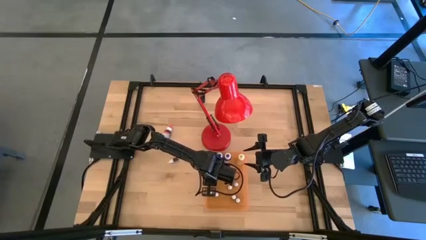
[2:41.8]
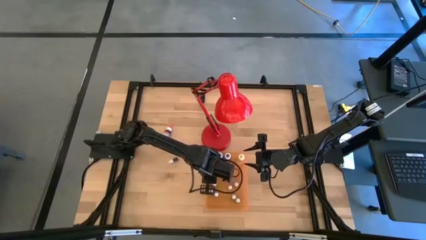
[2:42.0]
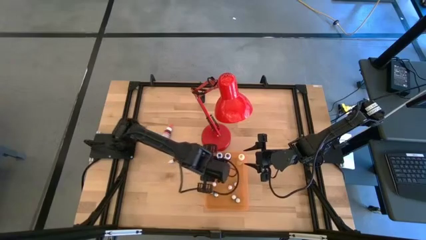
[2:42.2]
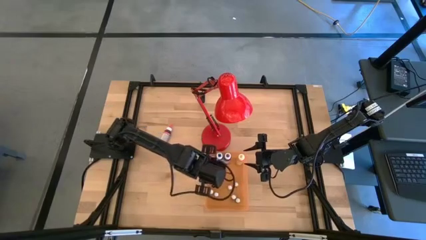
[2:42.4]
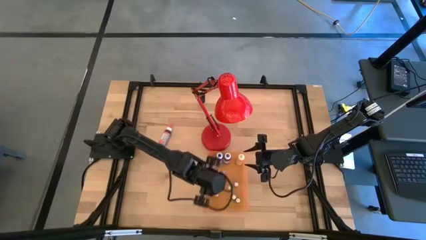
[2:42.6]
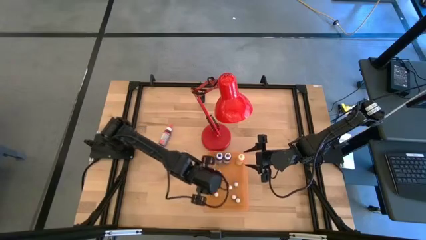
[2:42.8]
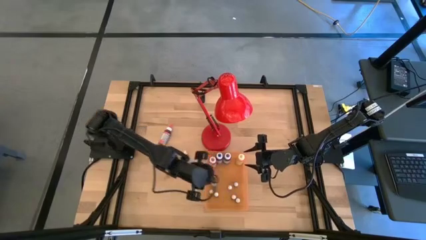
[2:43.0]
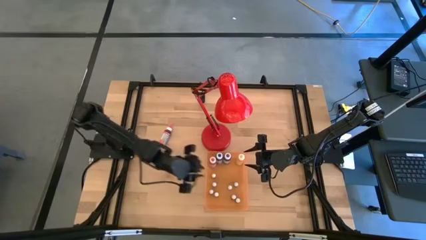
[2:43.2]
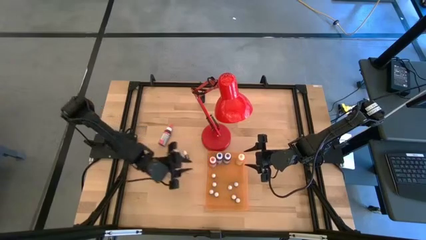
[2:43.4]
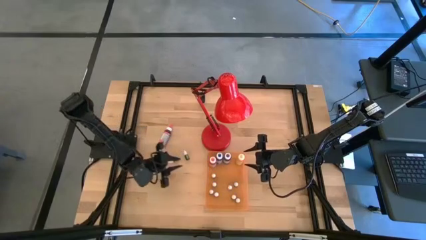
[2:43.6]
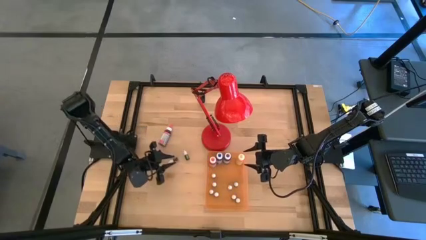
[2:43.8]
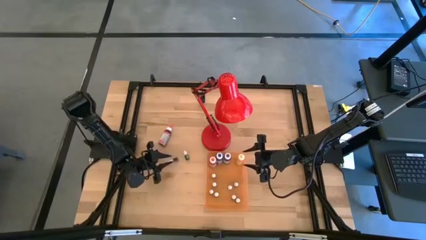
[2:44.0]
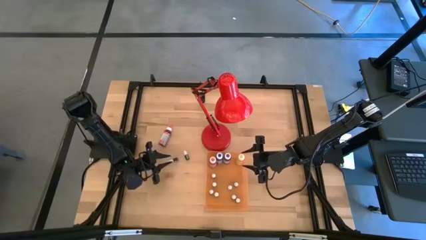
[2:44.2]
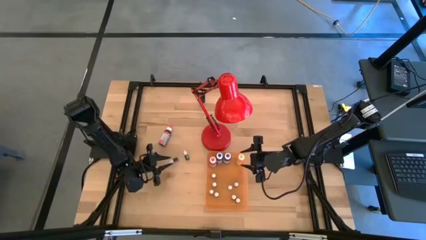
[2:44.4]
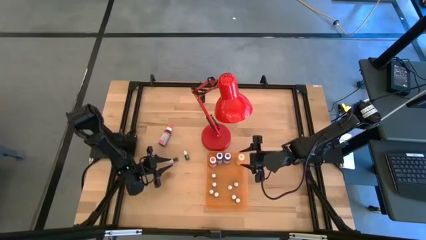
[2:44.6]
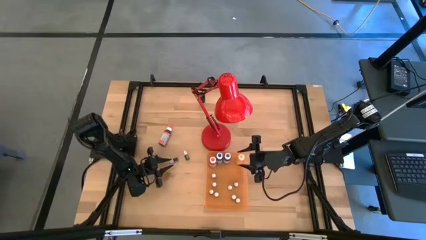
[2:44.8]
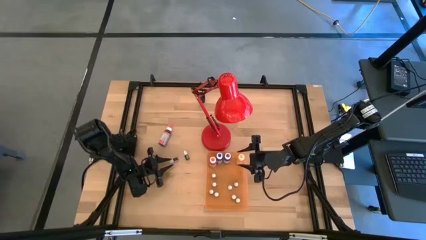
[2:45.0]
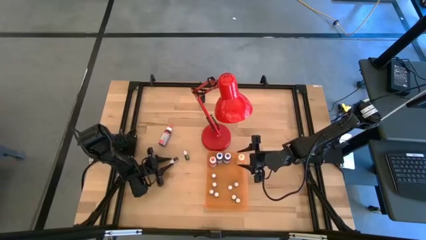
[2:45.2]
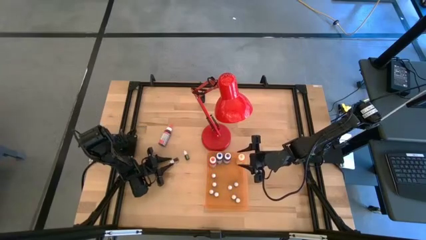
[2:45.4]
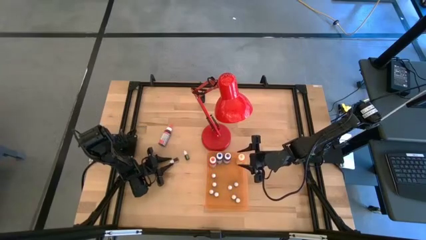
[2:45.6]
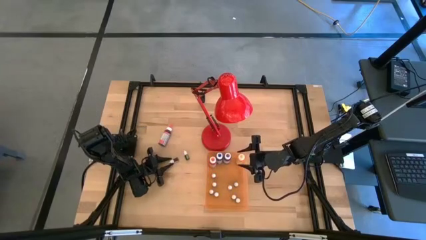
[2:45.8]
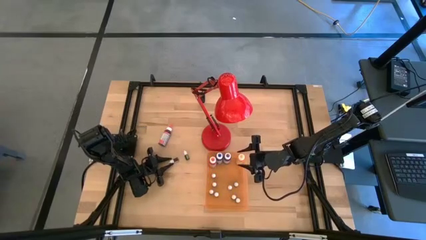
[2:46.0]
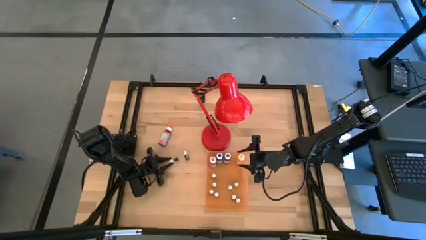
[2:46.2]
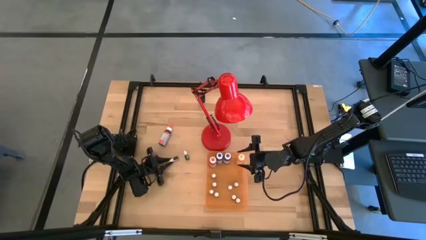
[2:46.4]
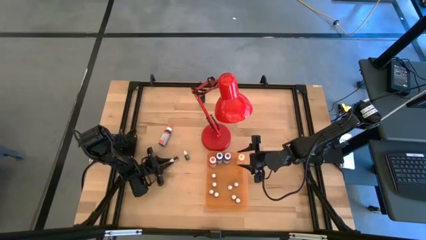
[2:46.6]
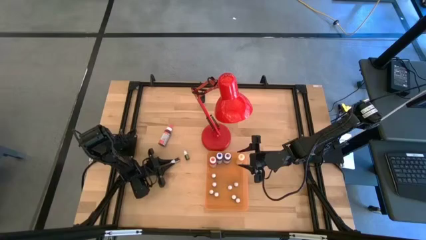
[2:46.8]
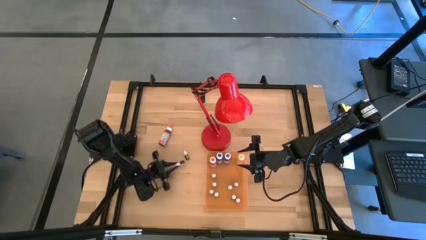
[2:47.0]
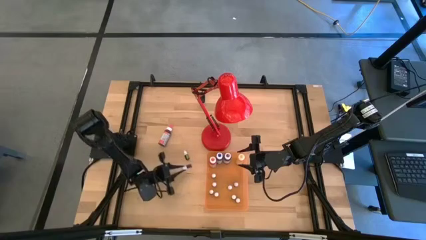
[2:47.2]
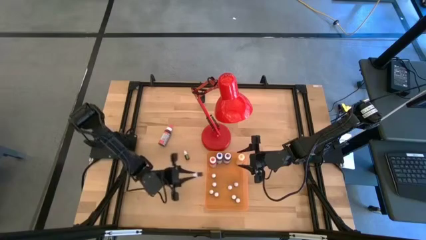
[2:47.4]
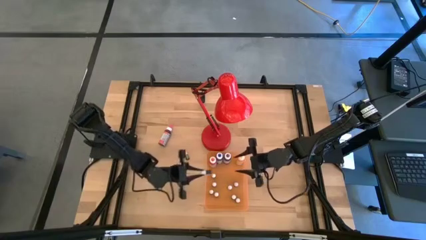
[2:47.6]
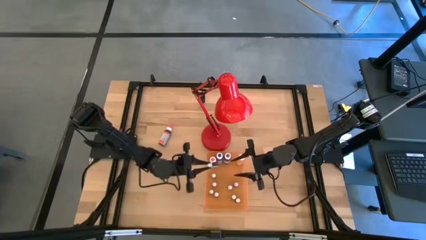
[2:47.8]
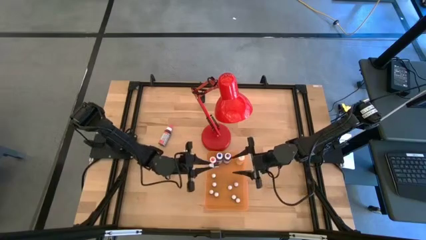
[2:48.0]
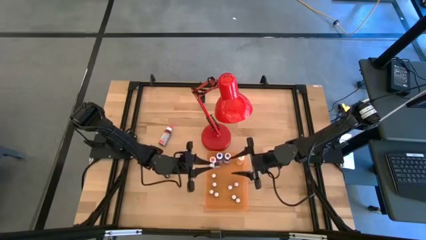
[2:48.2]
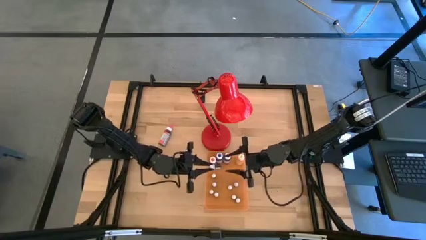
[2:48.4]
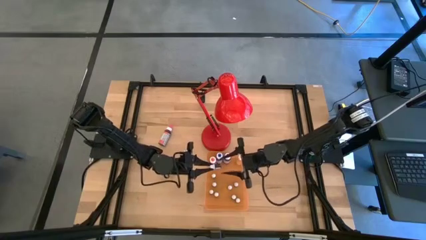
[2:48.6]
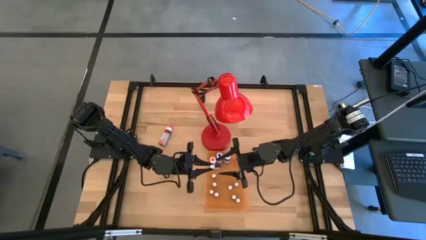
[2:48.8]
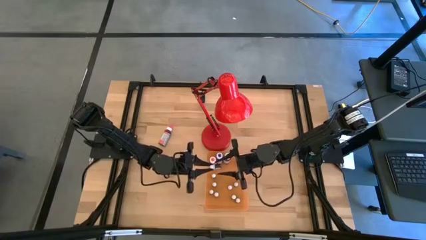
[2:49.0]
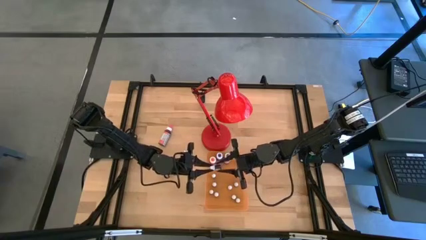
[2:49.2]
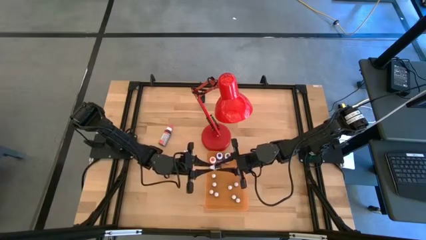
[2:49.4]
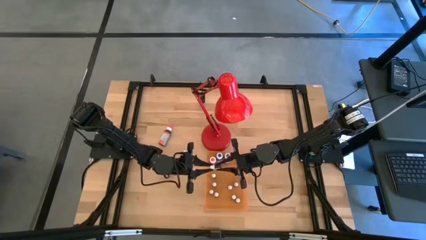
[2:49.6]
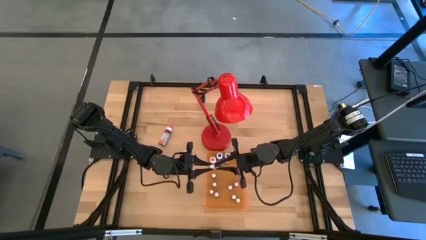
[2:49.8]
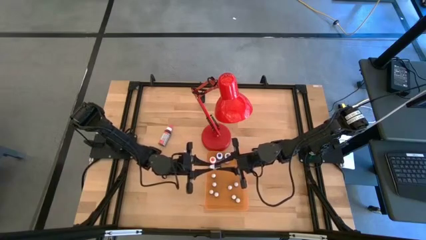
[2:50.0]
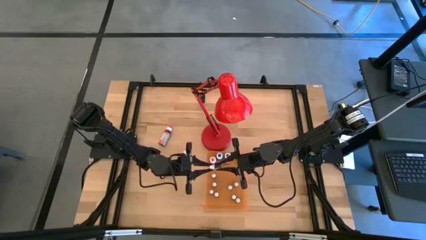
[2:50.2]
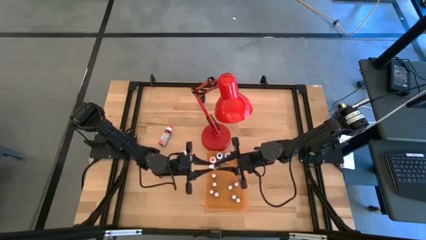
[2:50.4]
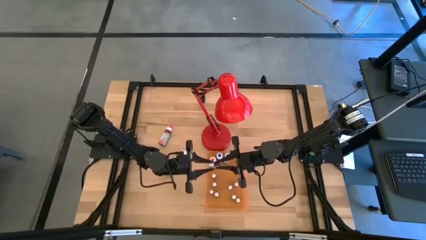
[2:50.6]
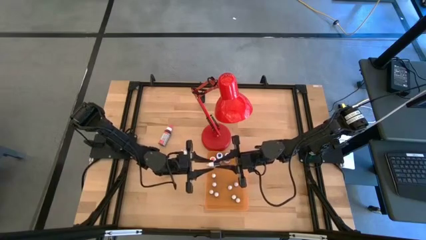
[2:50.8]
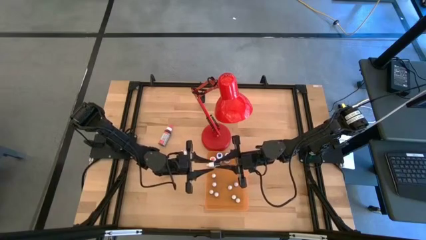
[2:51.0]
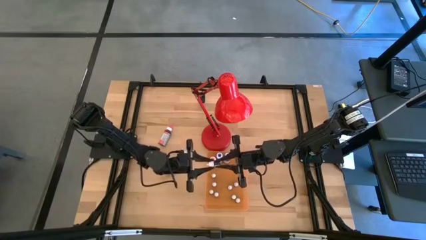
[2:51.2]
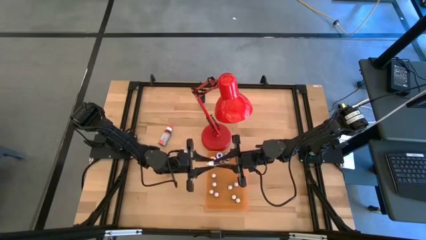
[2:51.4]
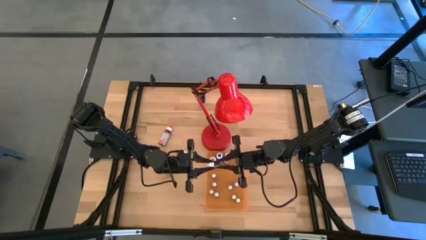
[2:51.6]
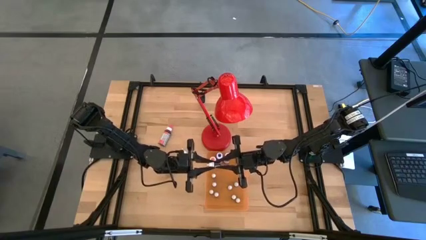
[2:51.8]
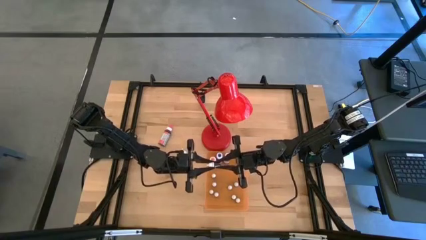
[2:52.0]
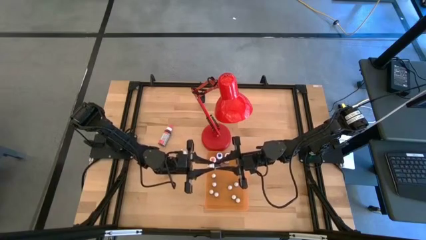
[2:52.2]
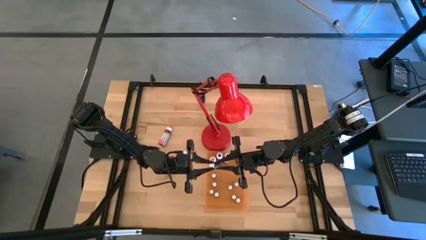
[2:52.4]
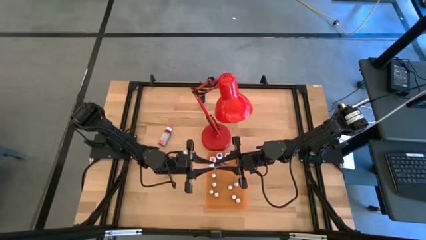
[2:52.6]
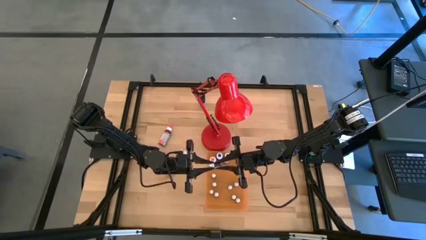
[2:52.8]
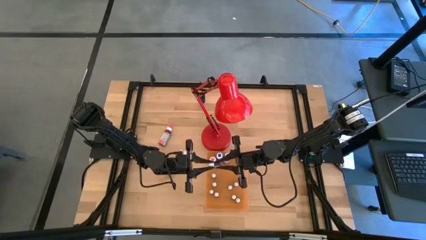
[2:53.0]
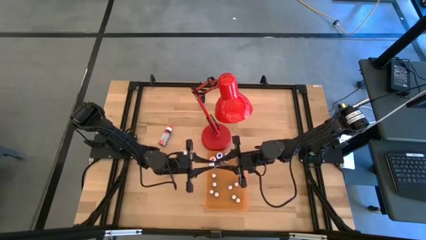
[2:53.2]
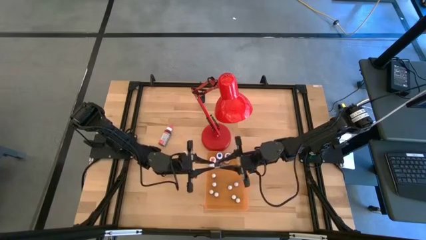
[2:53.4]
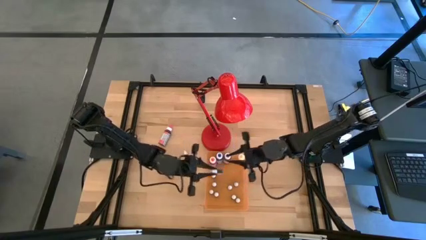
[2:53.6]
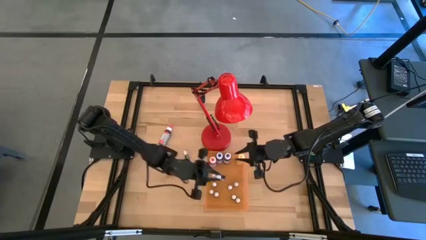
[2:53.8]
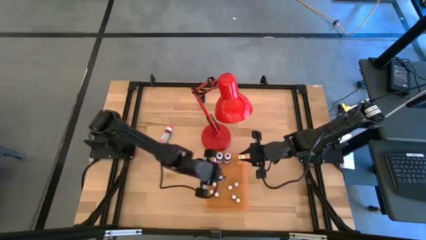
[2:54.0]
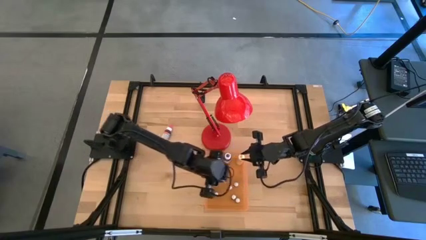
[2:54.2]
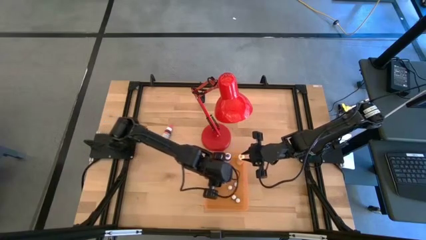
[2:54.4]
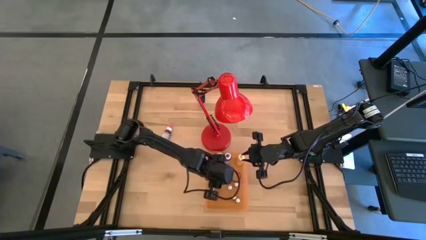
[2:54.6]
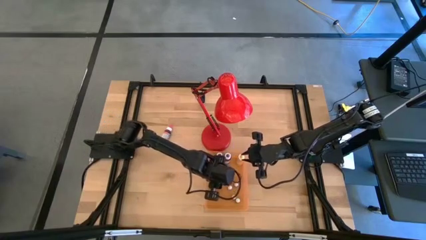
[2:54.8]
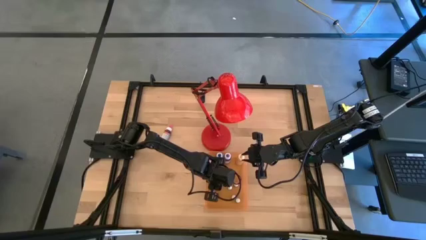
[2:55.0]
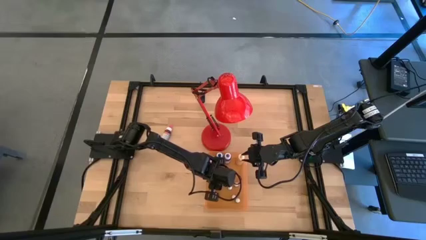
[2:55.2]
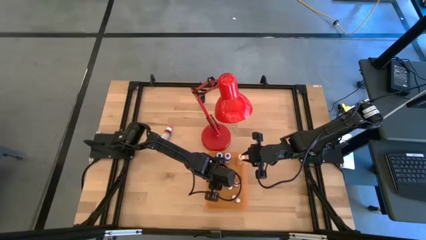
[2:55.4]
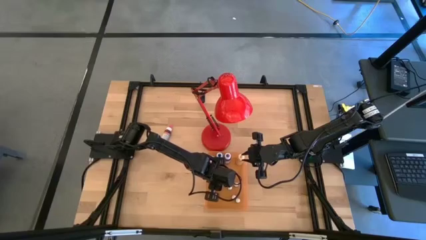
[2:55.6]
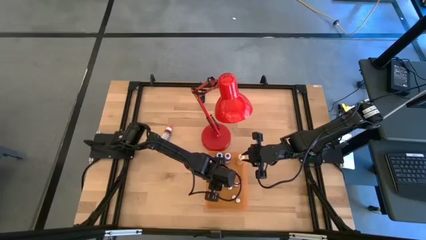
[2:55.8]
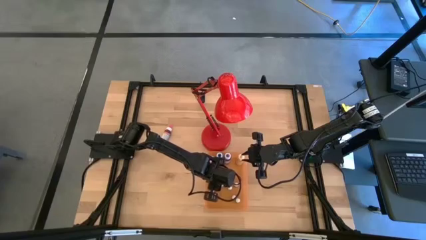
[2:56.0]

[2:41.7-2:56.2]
Task: Pick & Place food coloring
Put the small red food coloring bottle into the orange bin

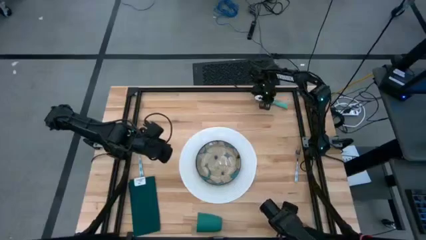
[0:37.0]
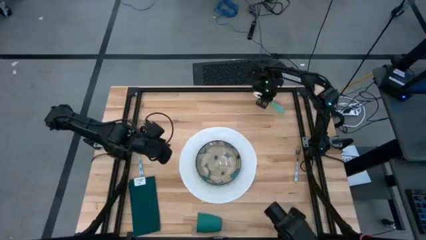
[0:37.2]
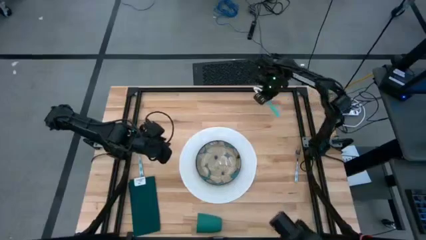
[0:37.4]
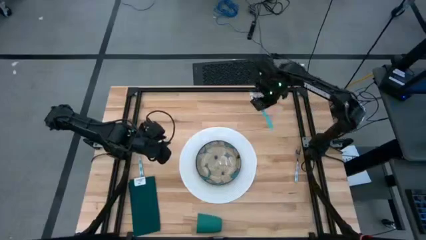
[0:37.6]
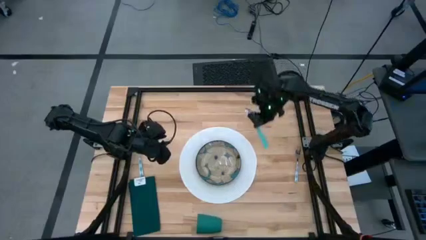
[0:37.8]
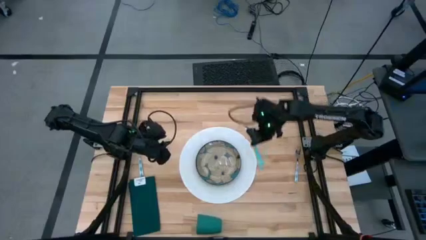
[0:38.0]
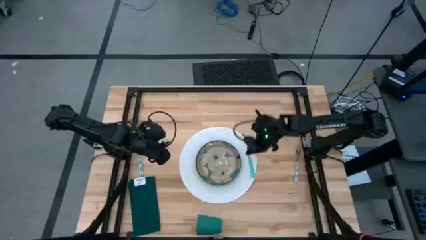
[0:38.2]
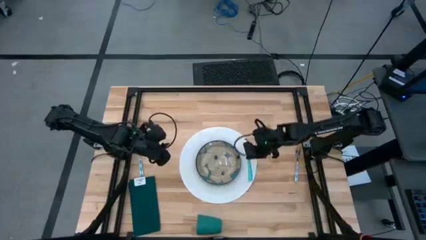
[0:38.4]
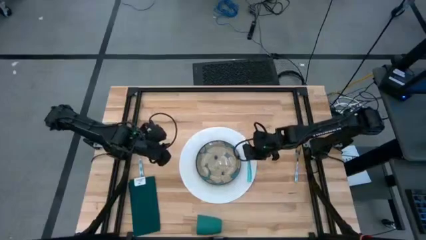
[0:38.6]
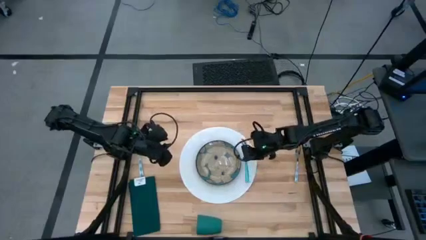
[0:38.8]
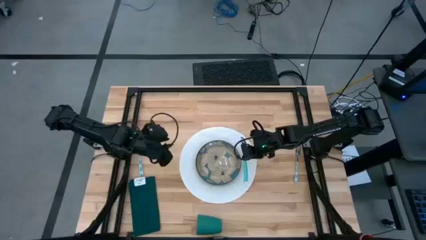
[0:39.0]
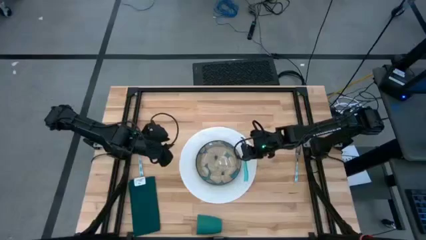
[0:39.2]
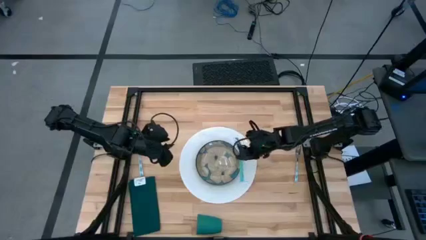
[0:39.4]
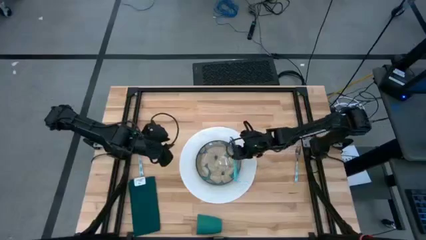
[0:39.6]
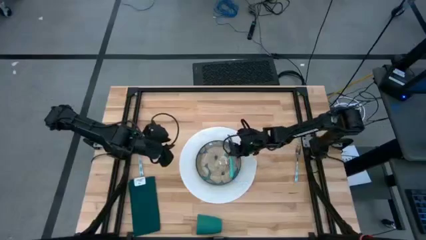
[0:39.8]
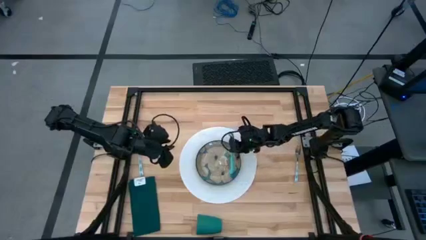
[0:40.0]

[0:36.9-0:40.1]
Task: Set table place
Put the blue spoon on the right side of the white table mat
